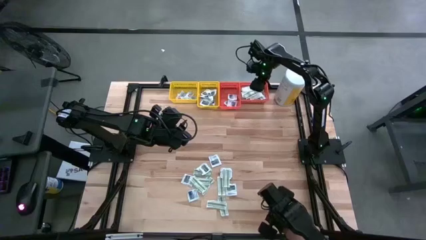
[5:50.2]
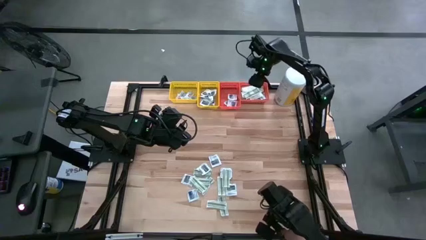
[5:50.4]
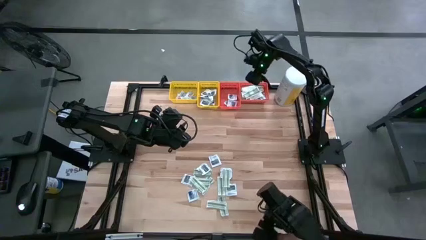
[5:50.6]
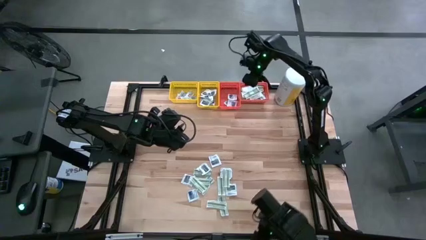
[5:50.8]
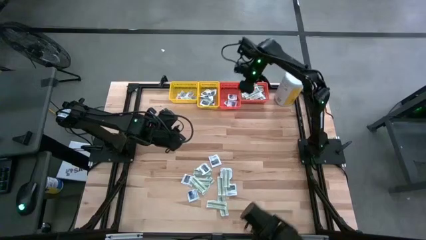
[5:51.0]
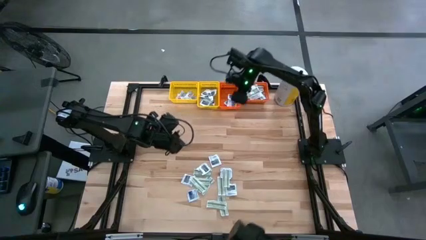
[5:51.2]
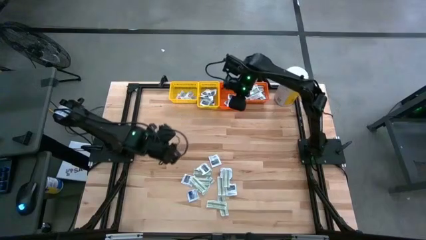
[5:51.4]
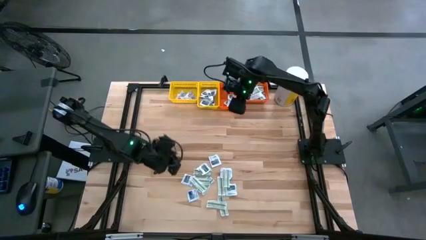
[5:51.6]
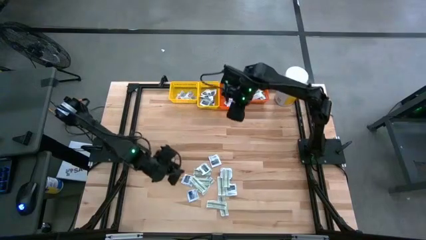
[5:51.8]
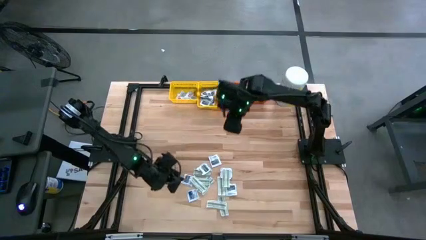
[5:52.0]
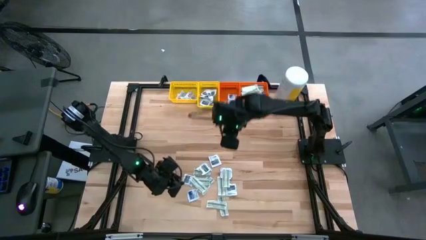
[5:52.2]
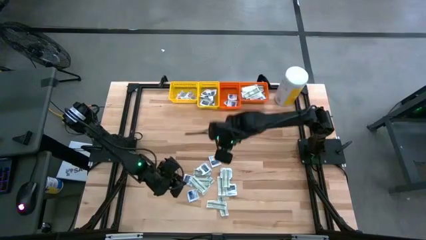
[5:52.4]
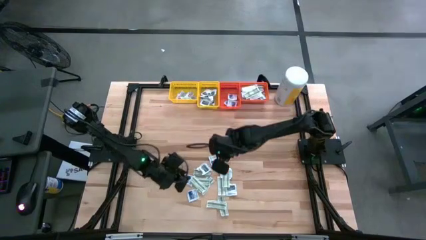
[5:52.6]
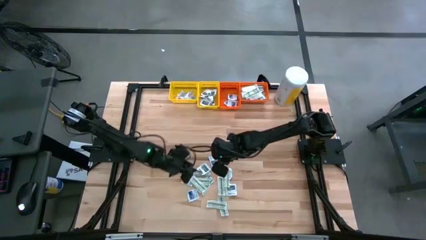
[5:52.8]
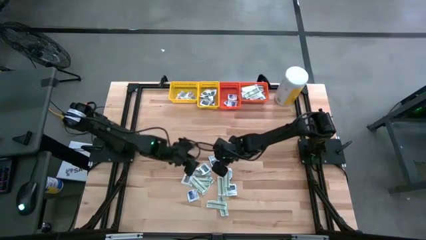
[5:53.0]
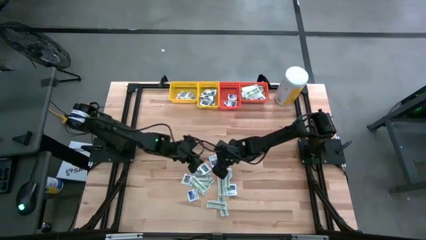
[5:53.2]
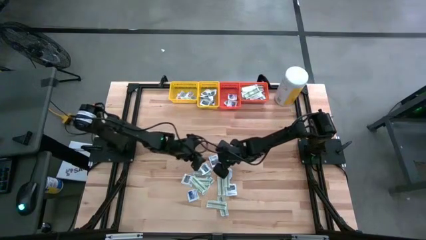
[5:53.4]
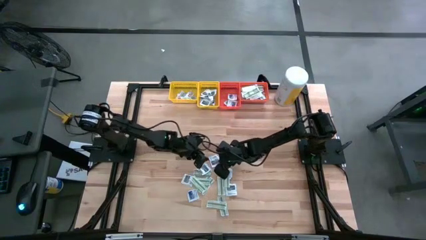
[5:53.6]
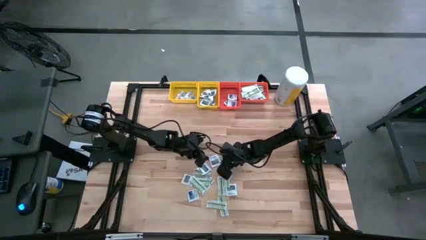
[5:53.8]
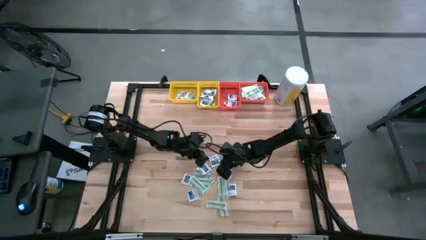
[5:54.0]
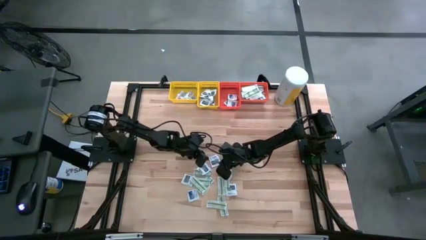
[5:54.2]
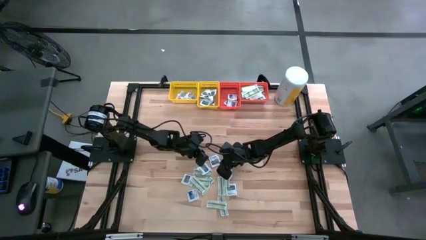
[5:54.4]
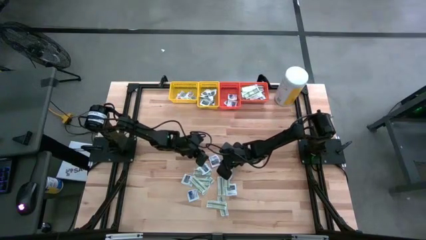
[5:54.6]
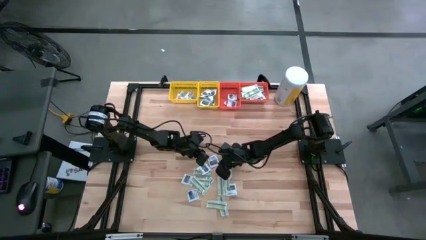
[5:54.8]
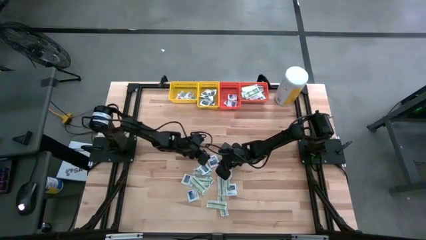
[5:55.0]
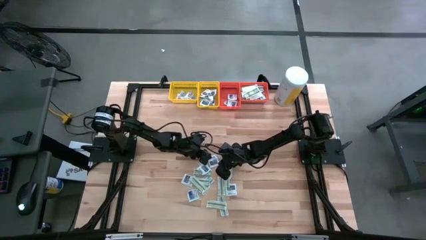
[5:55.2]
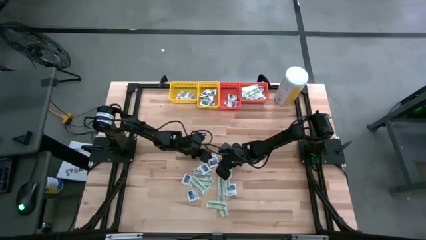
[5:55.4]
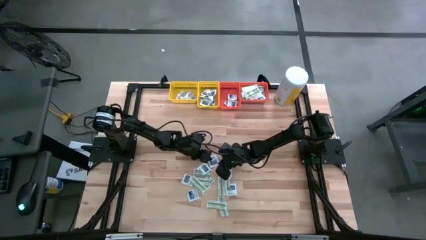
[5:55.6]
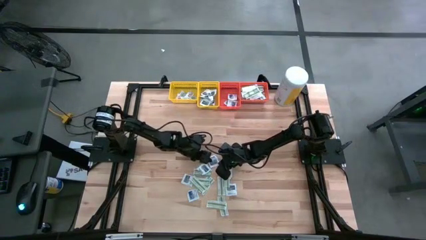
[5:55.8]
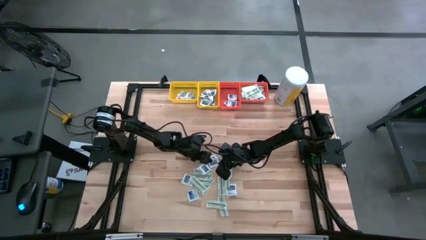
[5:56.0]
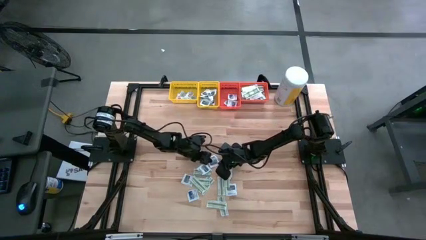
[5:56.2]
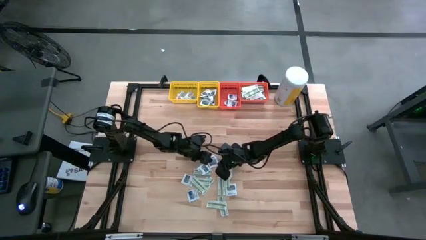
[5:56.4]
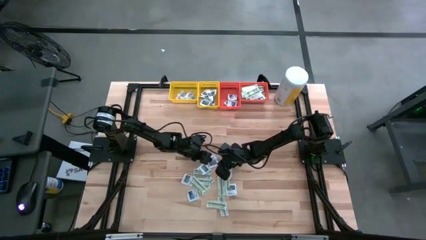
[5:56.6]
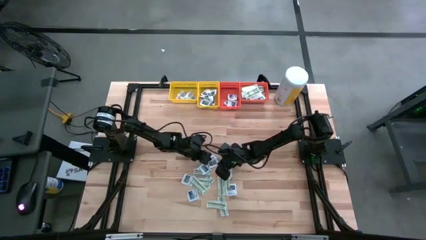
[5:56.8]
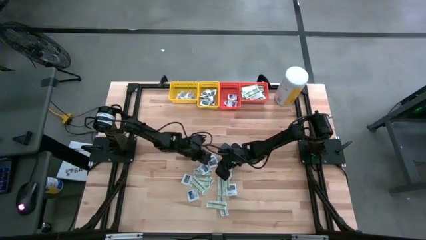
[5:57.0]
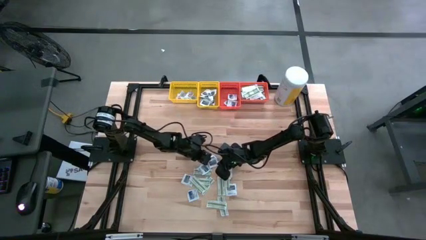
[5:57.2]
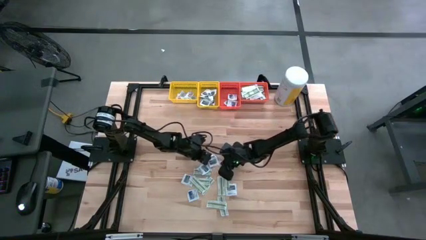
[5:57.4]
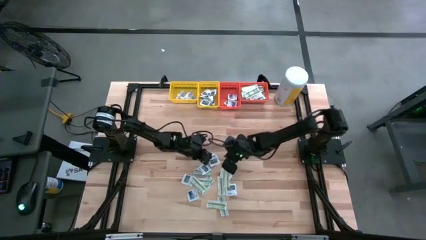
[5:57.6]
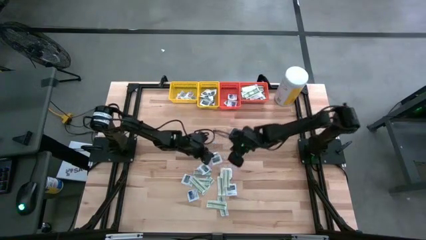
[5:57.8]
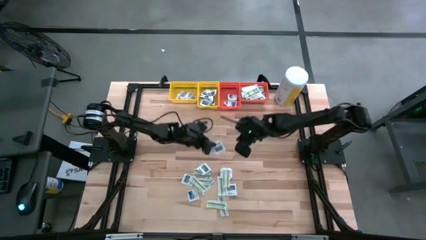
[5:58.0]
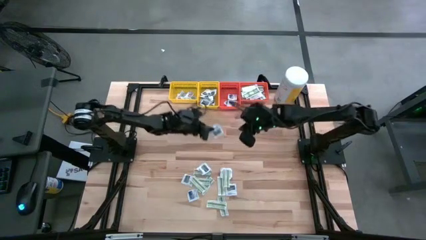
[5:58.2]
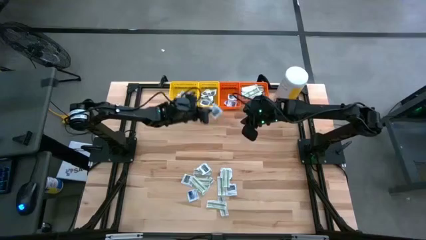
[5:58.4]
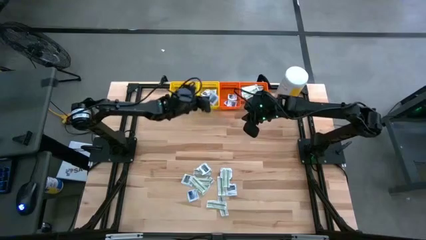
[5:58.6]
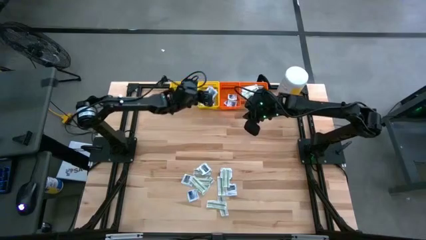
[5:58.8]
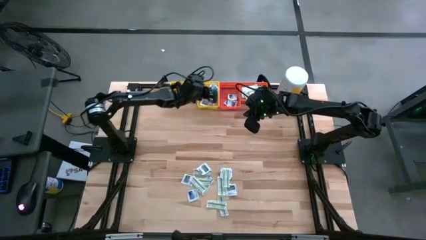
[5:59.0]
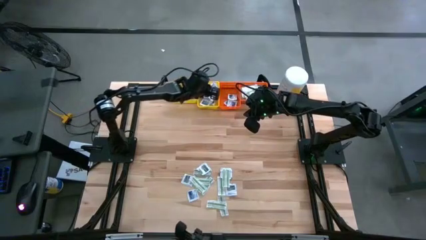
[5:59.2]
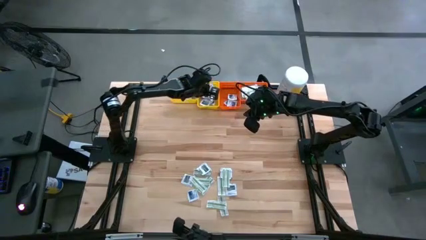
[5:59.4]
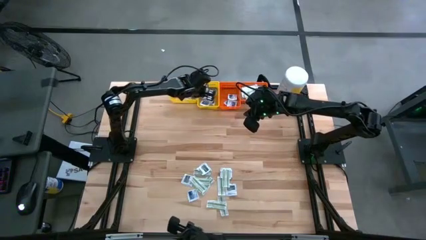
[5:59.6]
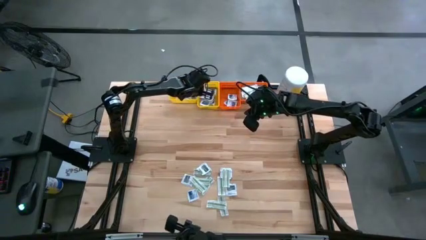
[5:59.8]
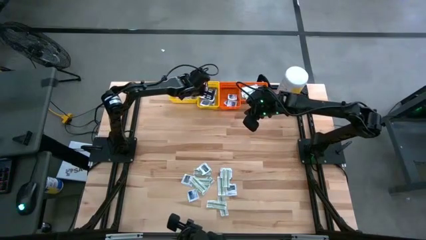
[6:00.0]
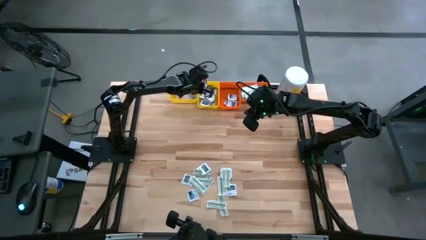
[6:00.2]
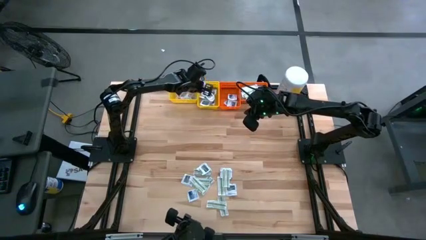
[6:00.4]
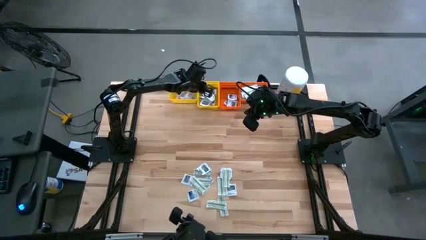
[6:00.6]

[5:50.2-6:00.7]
Task: Pick & Place First Aid Supplies
Put the gray packet into the right yellow bin

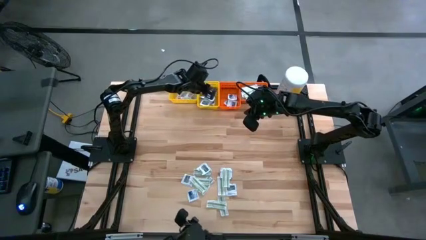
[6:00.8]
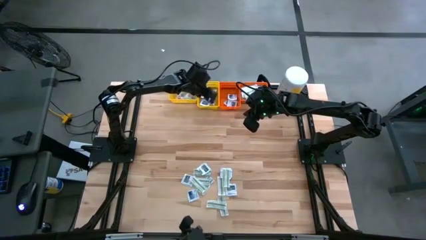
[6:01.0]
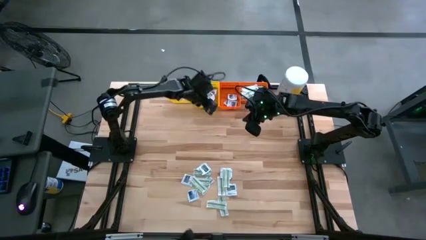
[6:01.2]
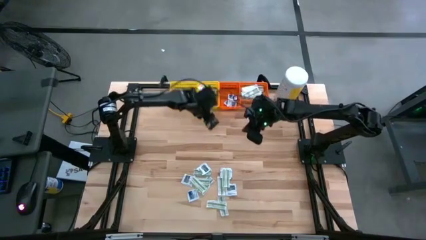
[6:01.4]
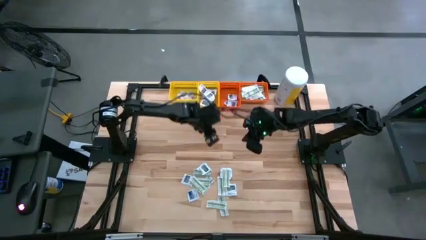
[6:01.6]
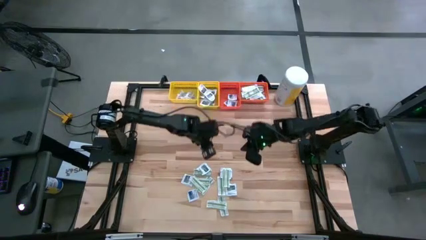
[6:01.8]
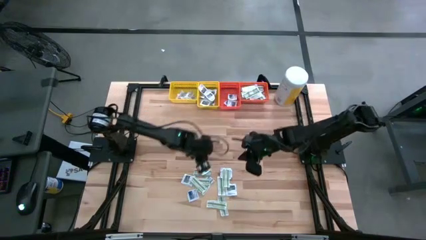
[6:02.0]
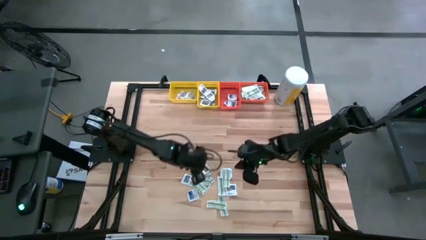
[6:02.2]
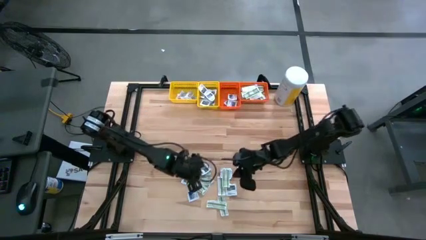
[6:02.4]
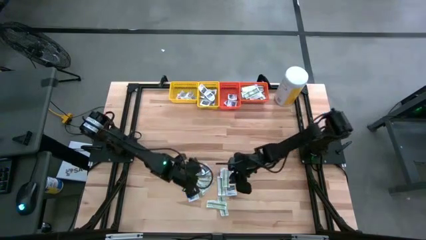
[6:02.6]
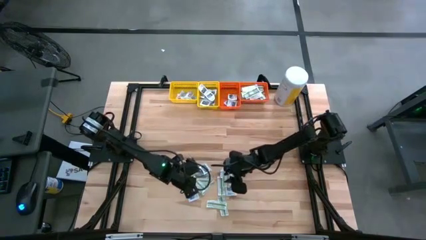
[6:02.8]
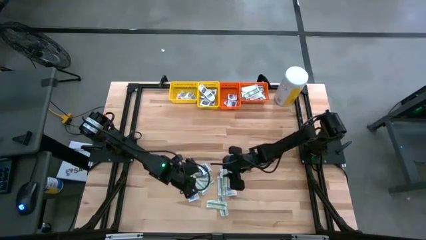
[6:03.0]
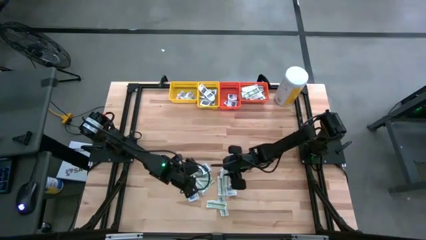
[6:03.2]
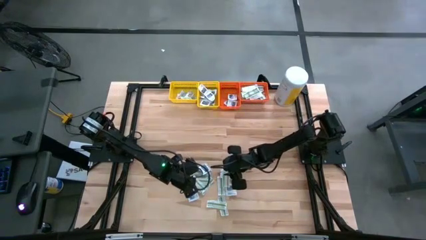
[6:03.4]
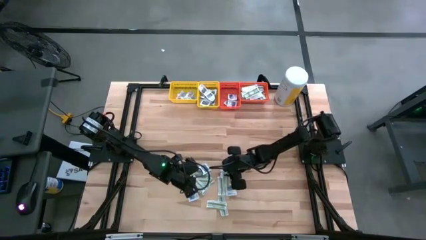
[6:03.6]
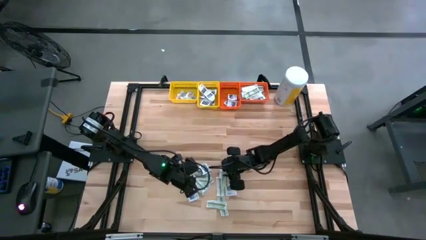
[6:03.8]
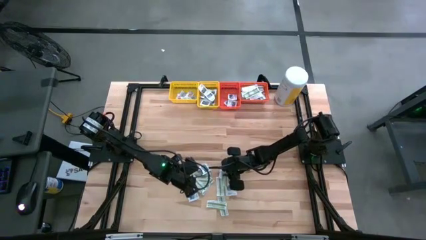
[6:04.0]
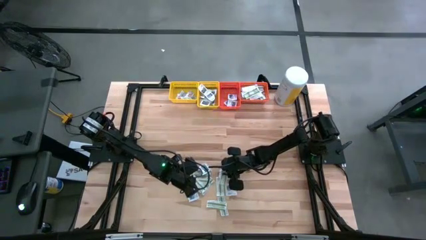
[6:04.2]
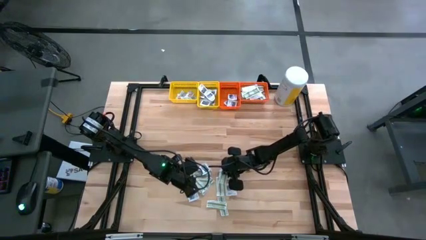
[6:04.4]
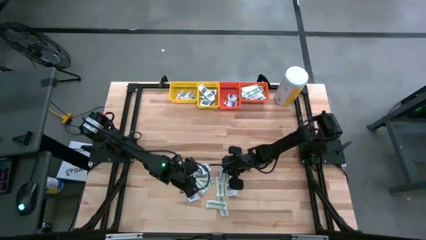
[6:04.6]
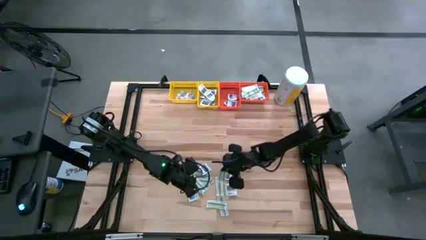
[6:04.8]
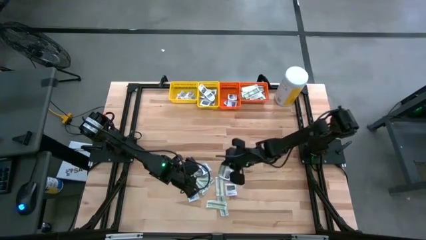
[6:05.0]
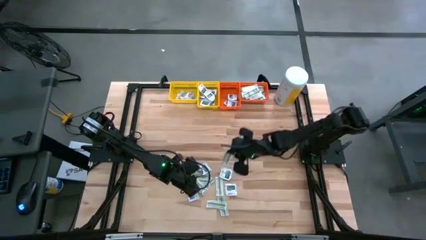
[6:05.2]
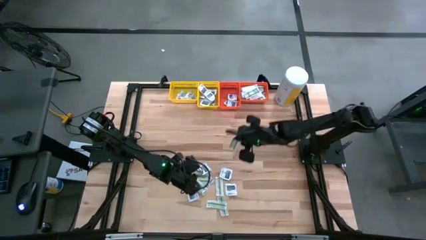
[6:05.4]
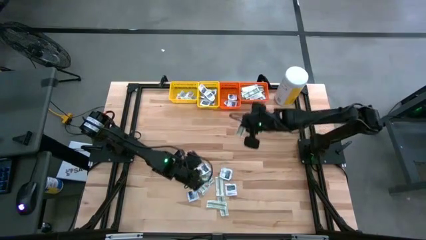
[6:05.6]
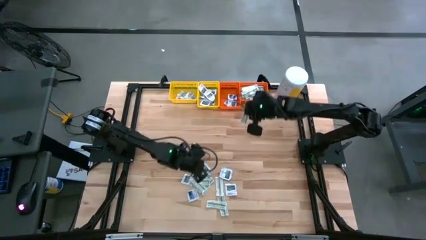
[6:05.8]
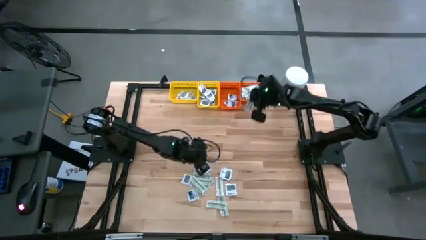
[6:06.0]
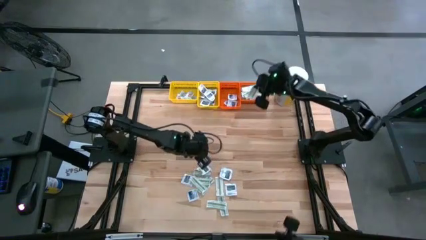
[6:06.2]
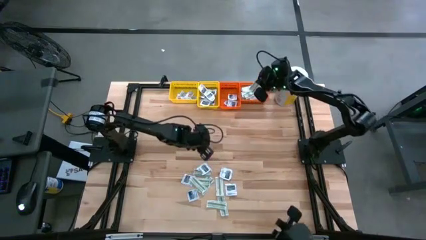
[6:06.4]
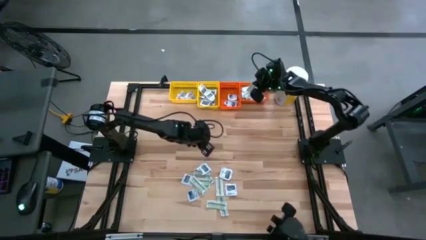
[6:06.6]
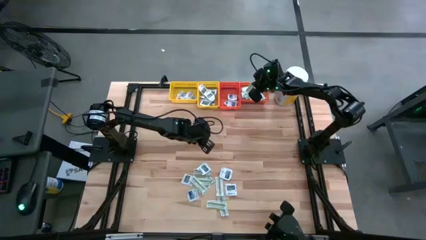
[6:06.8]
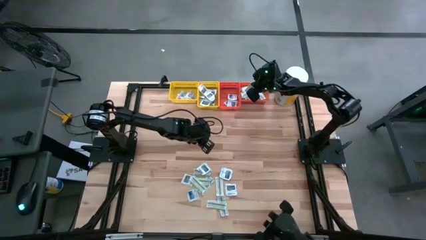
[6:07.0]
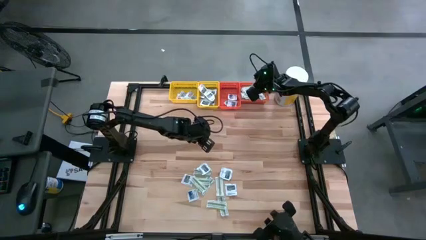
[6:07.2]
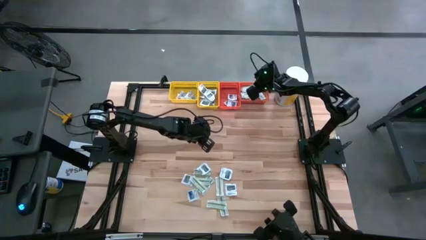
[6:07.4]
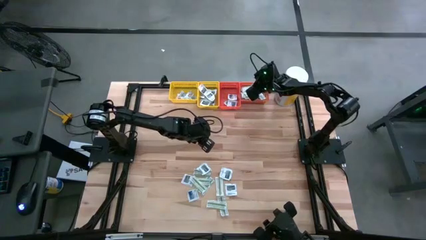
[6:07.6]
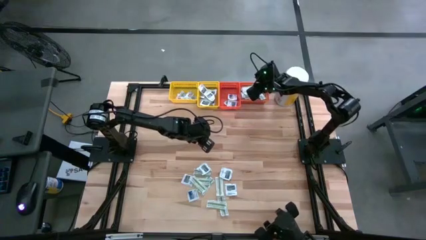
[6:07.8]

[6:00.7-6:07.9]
Put the green pad into the right orange bin
